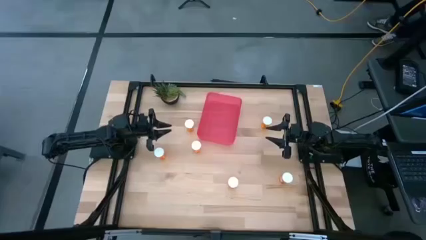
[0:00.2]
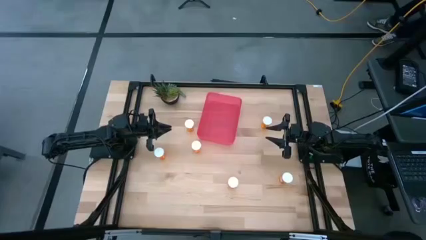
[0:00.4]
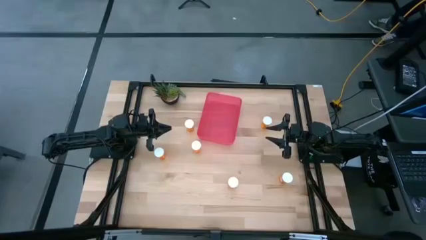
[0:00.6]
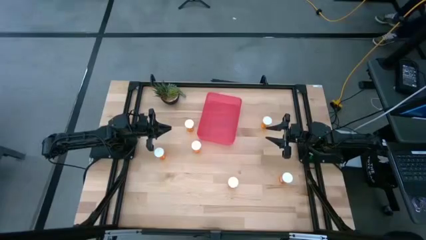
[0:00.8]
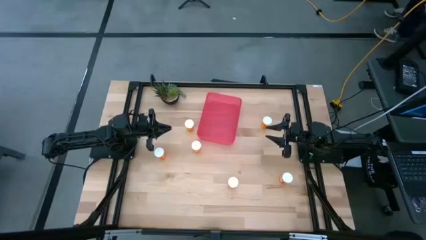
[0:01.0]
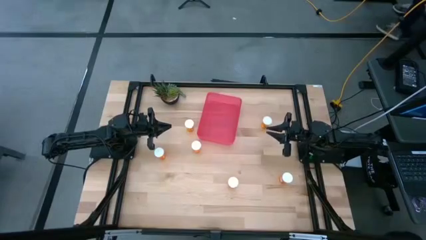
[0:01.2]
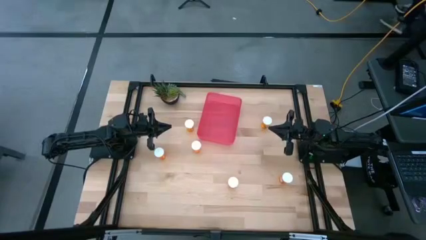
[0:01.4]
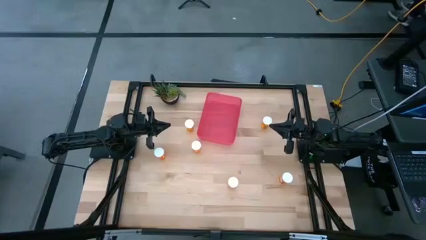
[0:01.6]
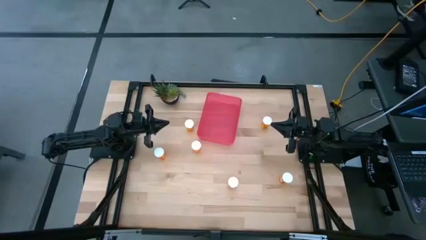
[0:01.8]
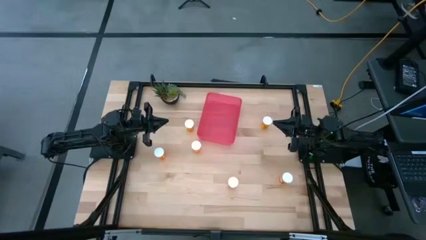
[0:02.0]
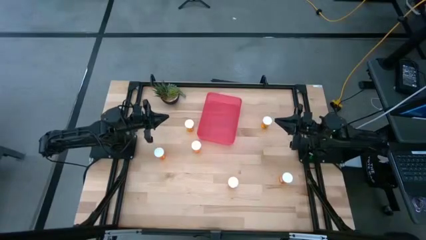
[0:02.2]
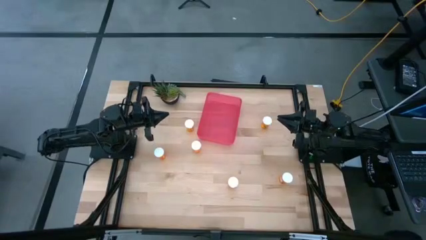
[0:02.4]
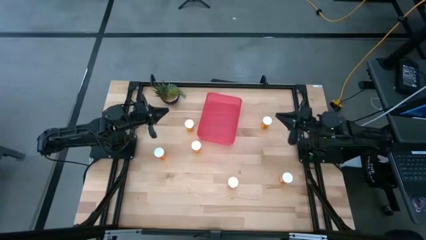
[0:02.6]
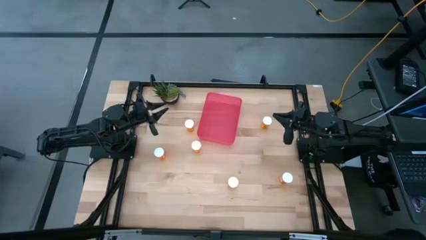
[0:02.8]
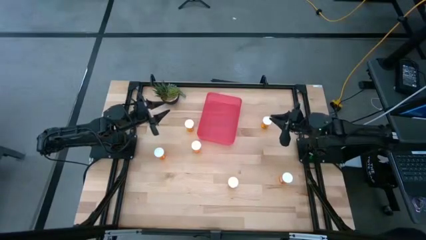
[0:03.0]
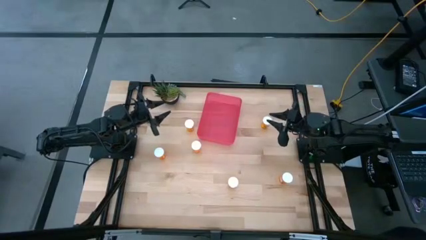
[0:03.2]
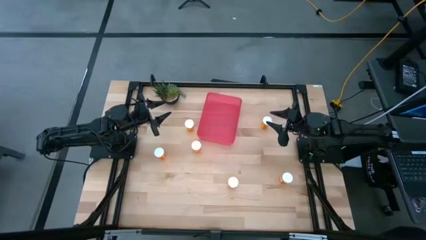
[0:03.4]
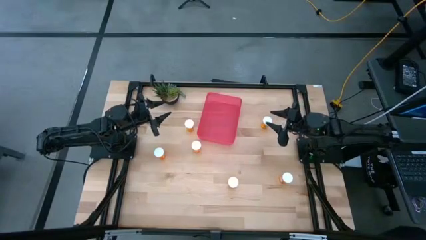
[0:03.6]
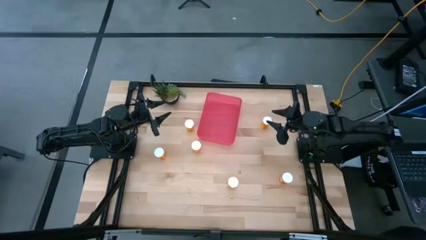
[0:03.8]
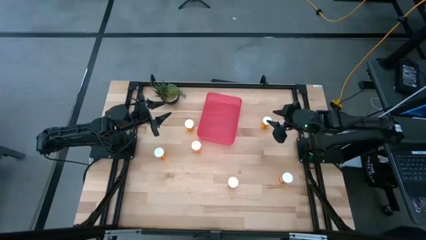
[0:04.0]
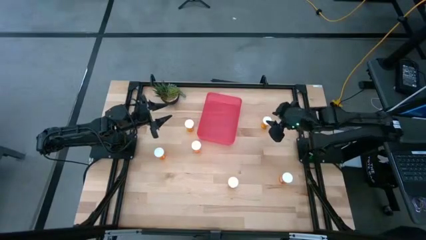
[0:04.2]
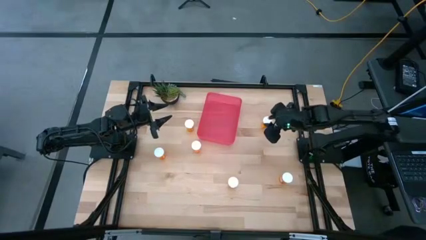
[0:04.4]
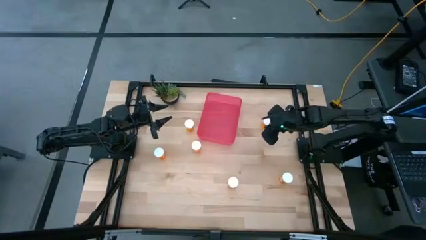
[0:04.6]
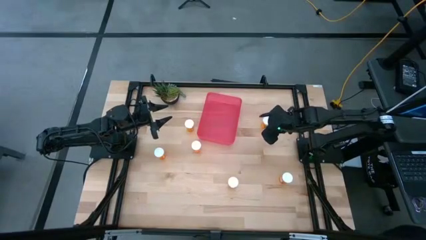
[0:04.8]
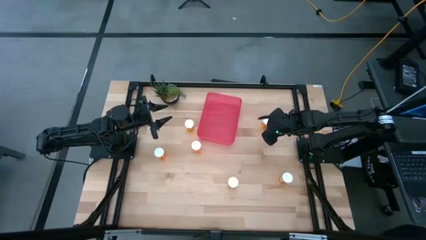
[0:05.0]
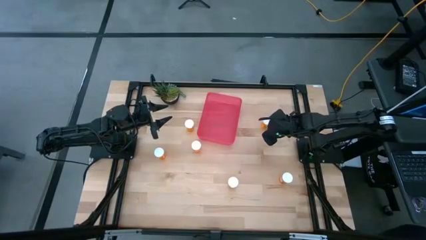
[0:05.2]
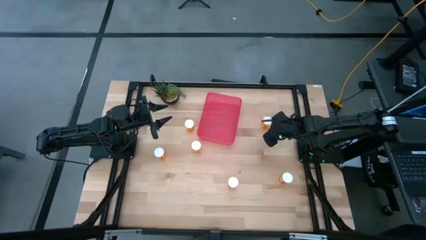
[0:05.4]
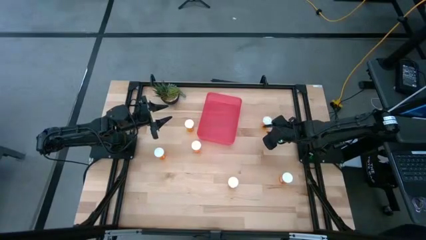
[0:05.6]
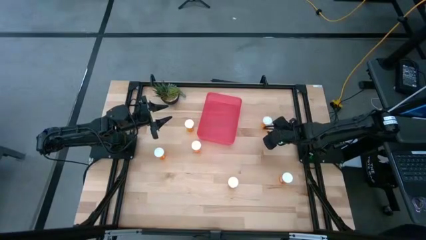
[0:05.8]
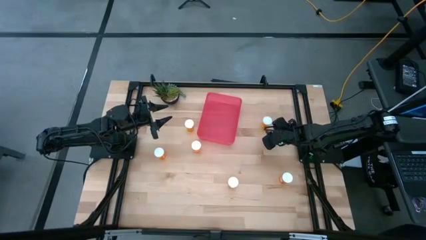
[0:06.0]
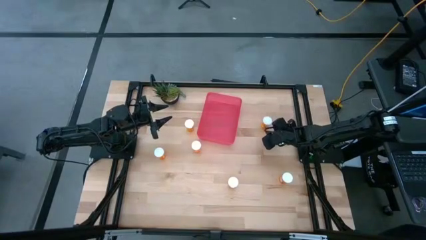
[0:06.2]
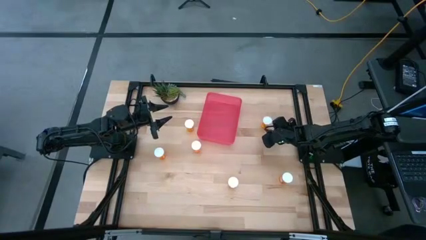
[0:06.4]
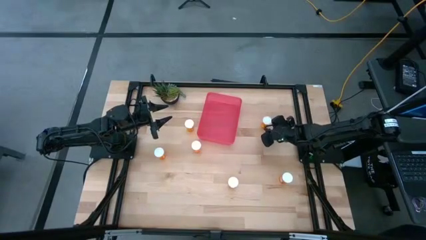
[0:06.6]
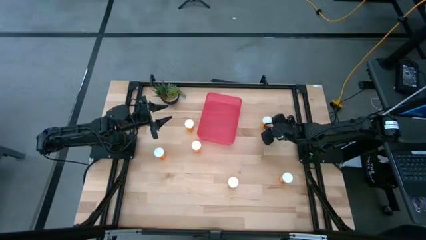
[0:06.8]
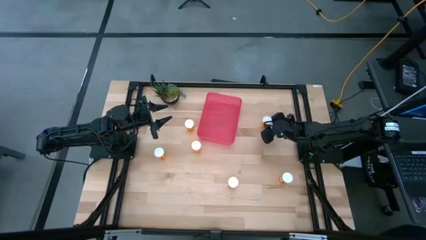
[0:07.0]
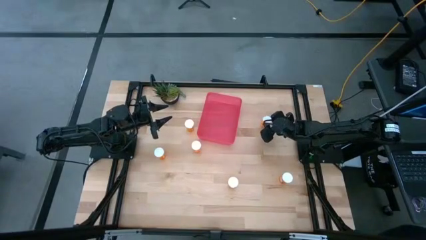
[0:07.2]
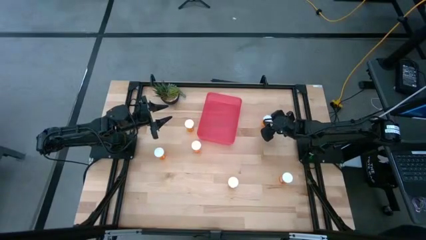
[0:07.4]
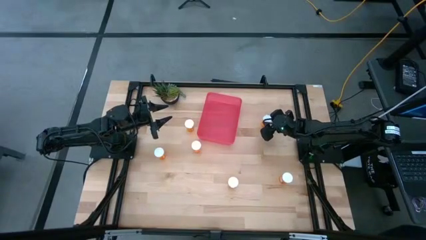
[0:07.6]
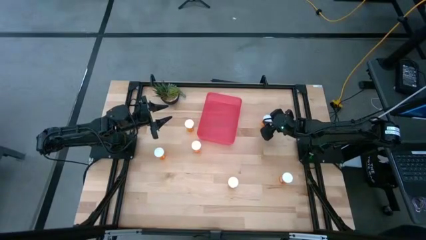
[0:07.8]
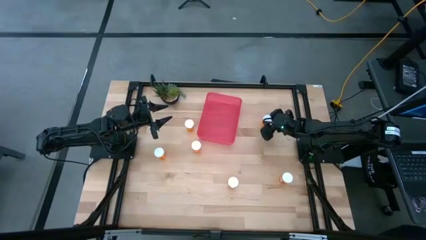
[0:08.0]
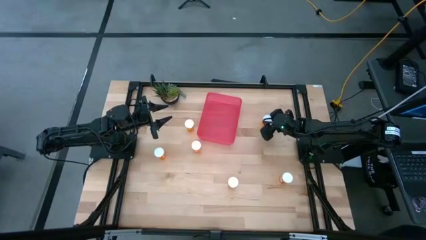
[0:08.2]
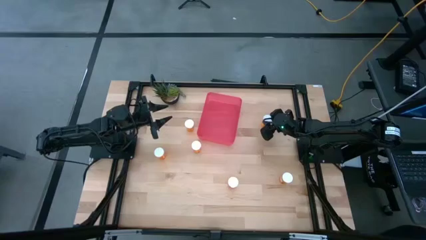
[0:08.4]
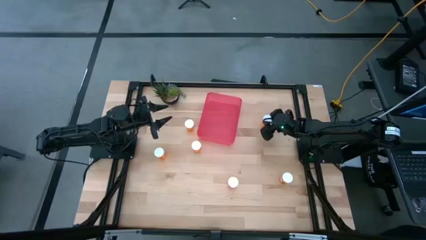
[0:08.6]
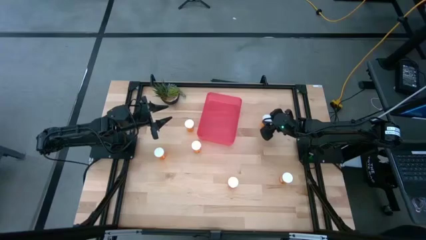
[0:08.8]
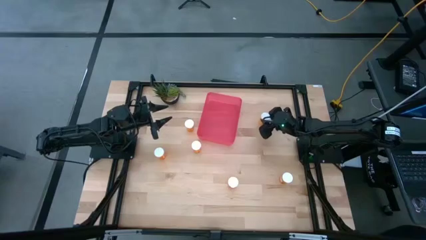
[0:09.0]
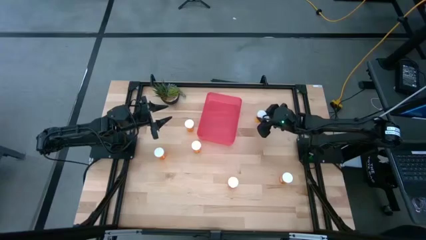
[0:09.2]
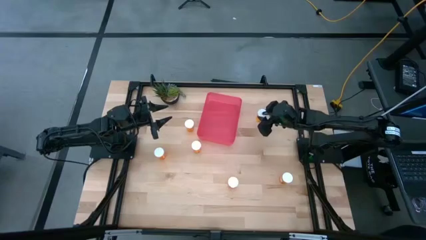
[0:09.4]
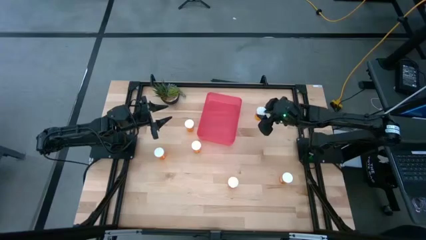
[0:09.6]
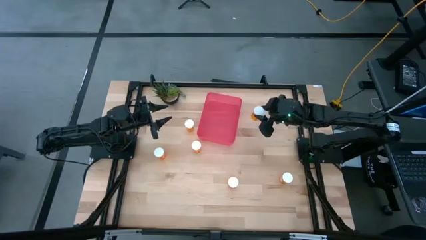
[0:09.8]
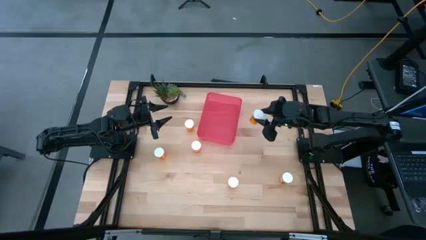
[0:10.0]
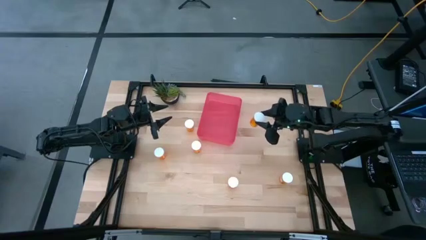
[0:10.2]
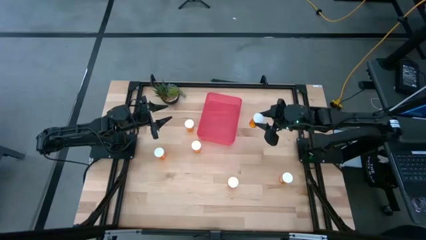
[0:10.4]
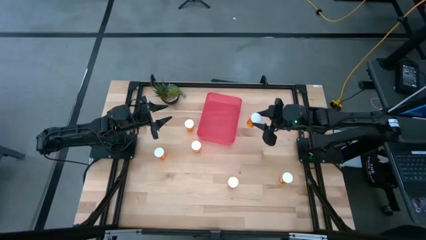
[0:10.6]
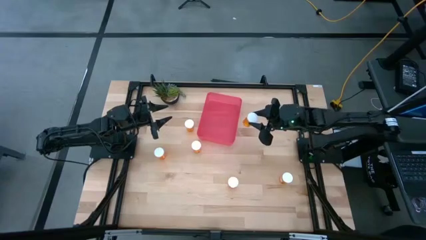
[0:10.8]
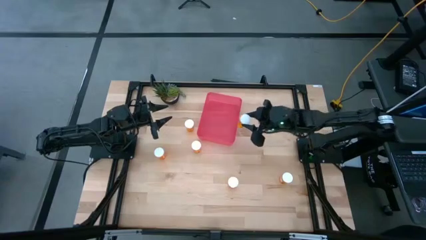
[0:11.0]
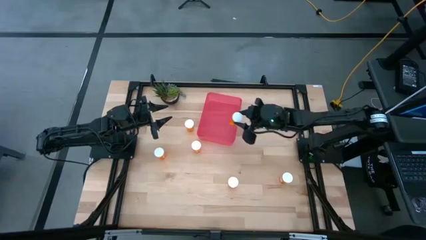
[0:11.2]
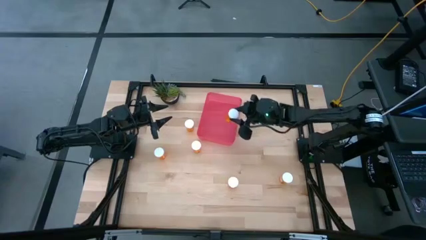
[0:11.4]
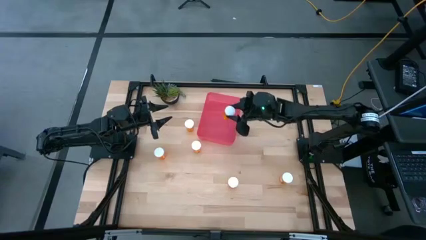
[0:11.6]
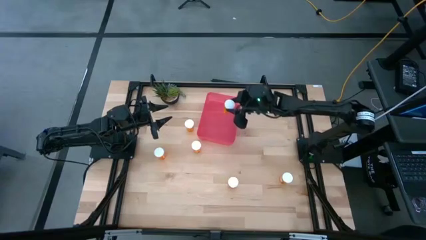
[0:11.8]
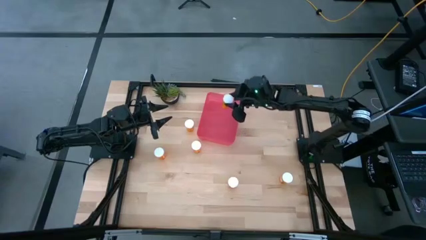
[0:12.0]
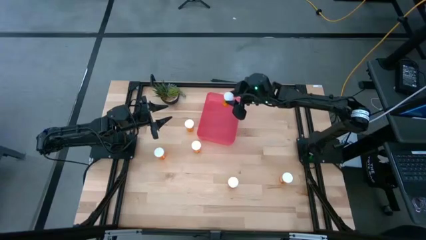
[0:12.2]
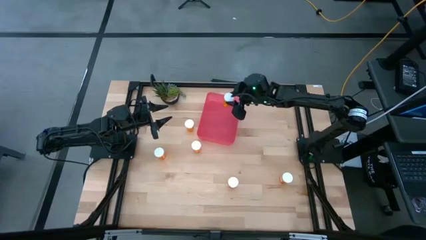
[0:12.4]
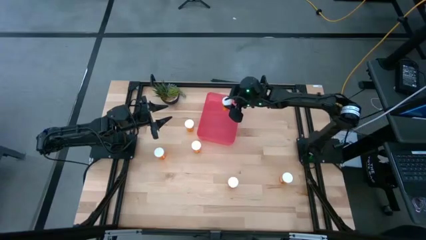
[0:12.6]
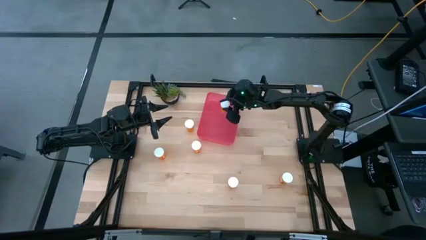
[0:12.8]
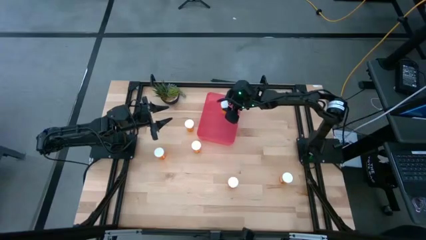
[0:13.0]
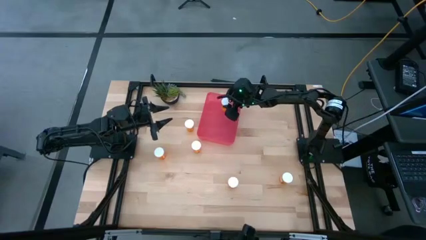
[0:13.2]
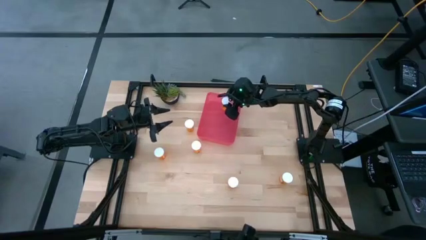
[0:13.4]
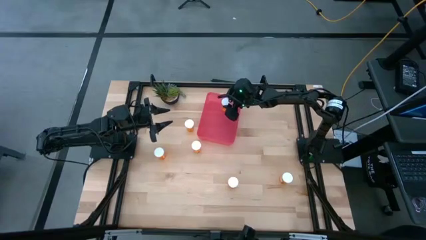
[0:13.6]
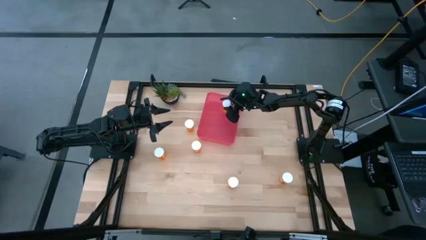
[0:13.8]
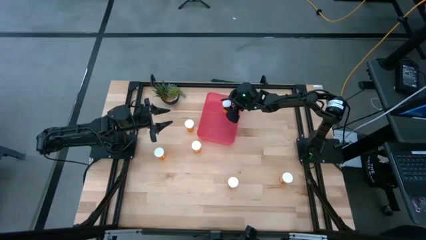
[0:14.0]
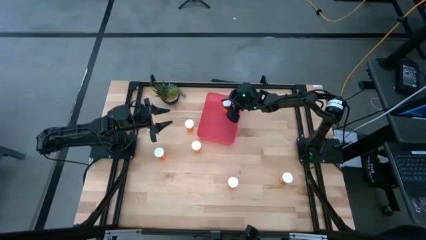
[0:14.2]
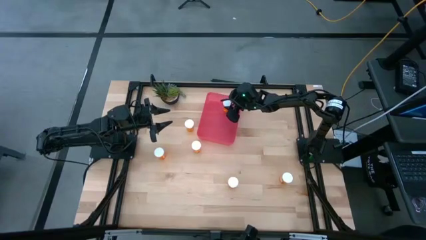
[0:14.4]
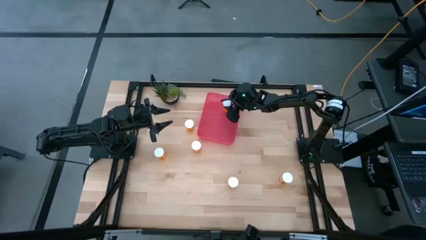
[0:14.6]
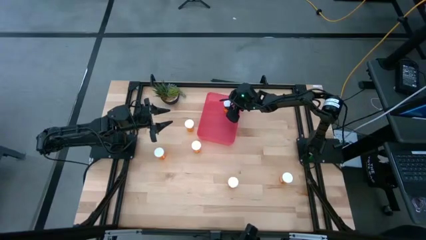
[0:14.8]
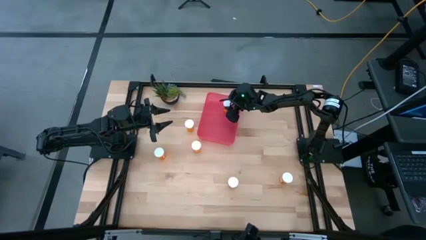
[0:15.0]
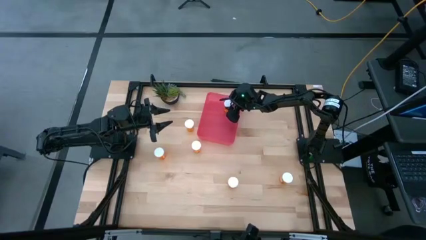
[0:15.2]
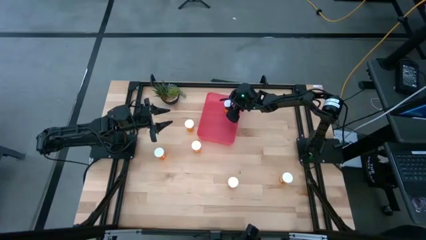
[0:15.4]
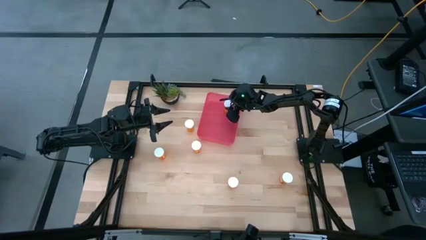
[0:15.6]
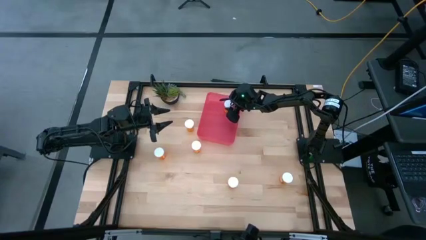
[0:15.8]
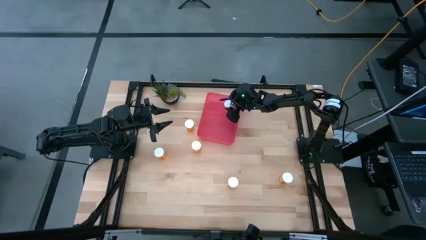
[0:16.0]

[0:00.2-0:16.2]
Task: Pick and place pill bottles into a basket
Put the orange pill bottle into the red bin
